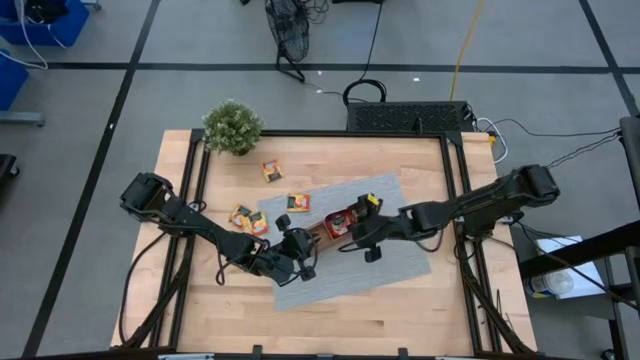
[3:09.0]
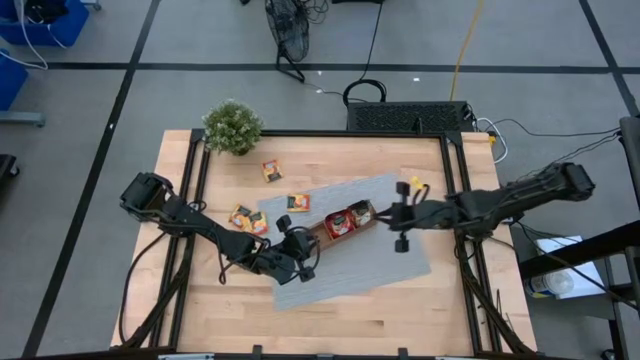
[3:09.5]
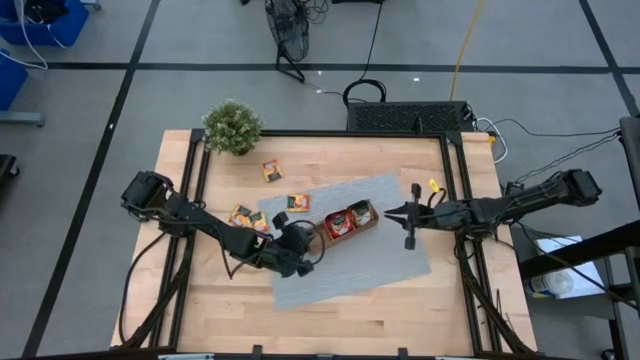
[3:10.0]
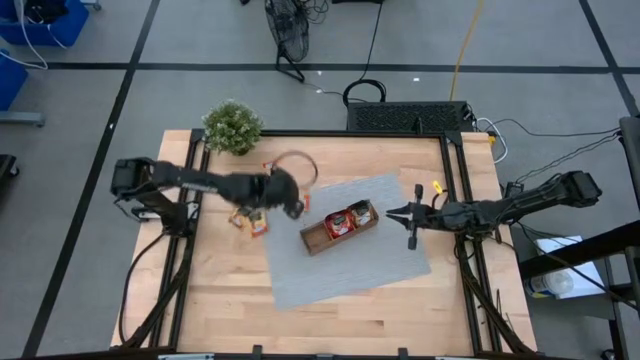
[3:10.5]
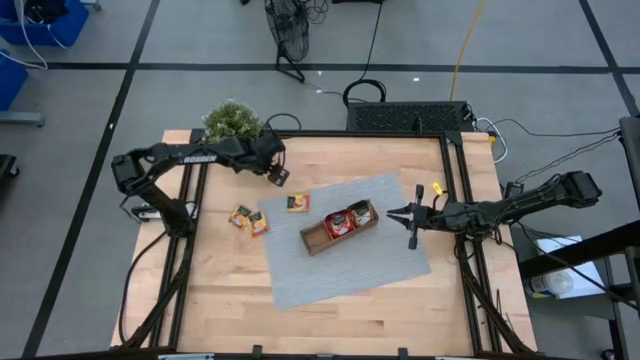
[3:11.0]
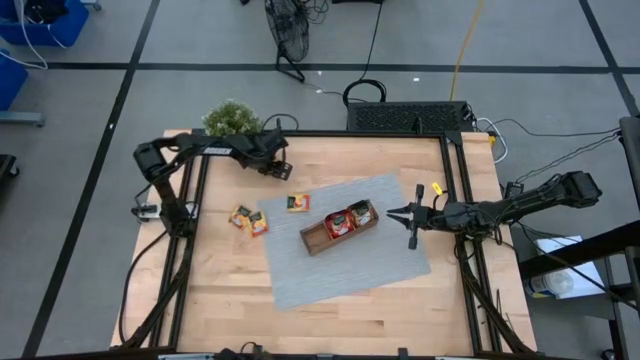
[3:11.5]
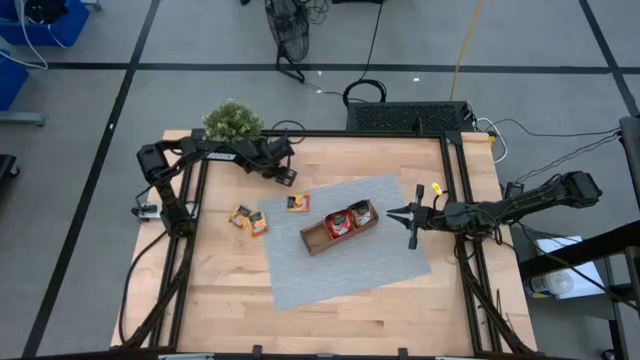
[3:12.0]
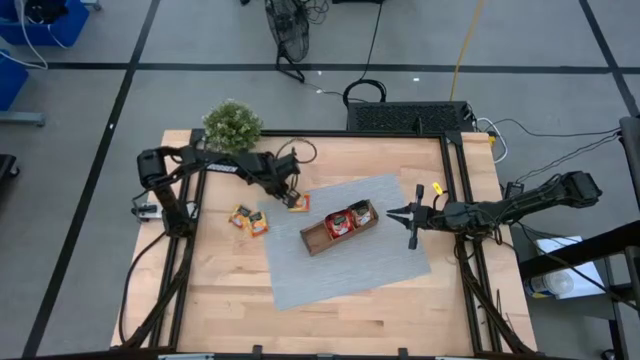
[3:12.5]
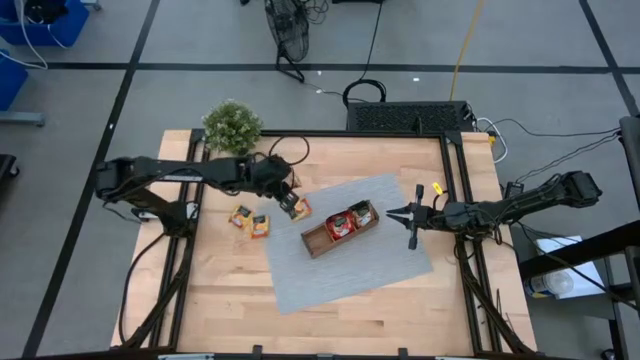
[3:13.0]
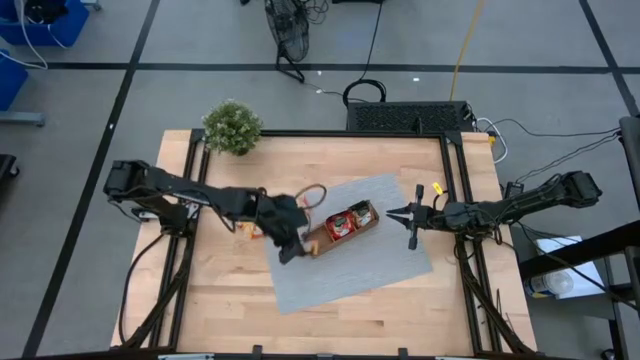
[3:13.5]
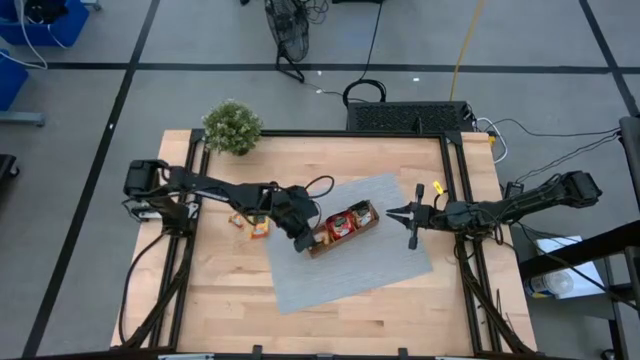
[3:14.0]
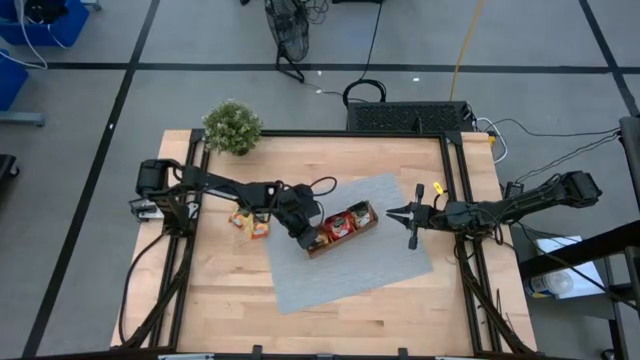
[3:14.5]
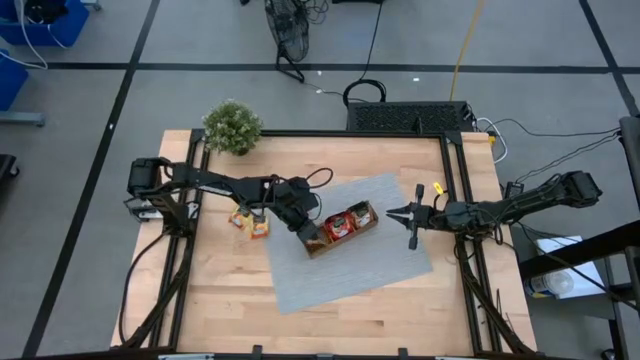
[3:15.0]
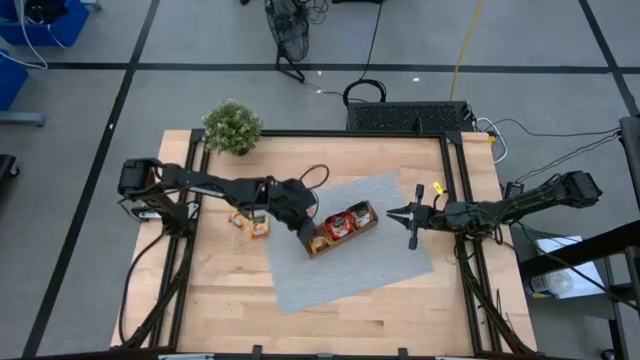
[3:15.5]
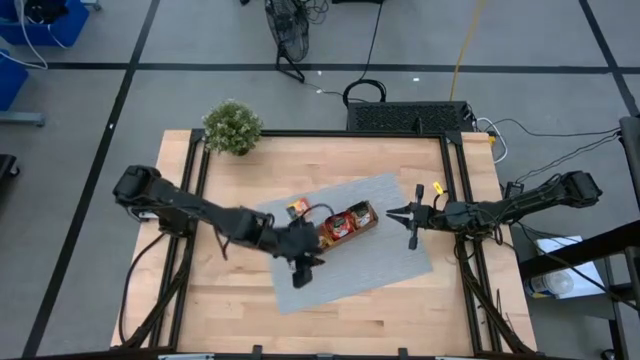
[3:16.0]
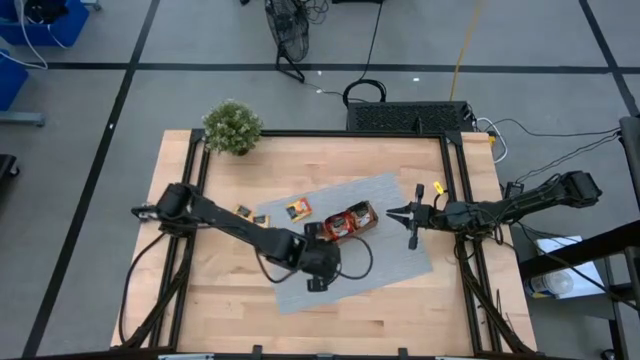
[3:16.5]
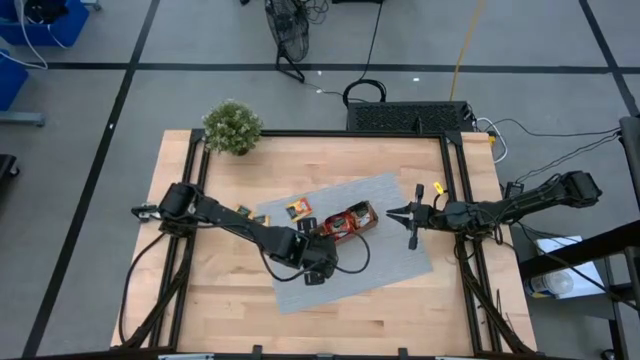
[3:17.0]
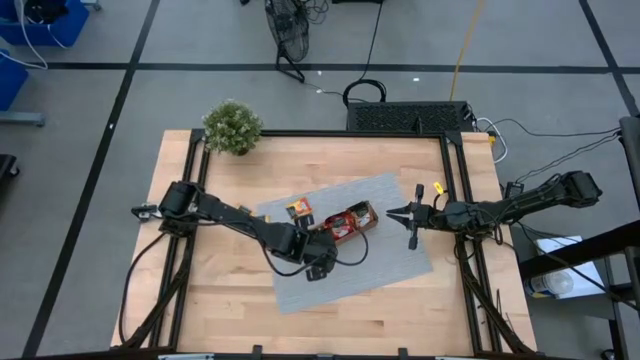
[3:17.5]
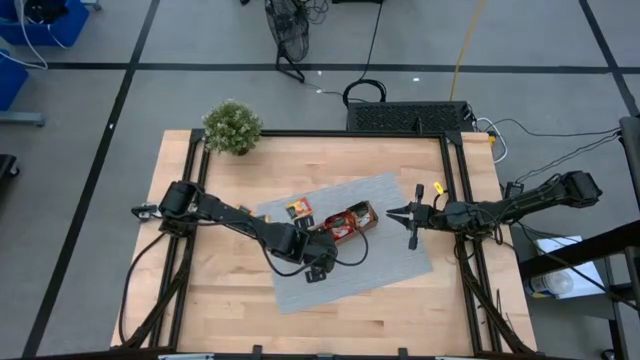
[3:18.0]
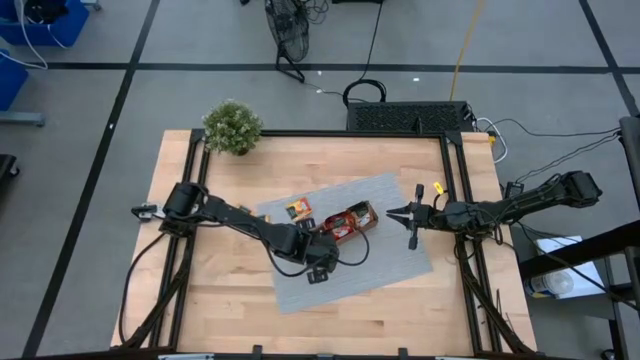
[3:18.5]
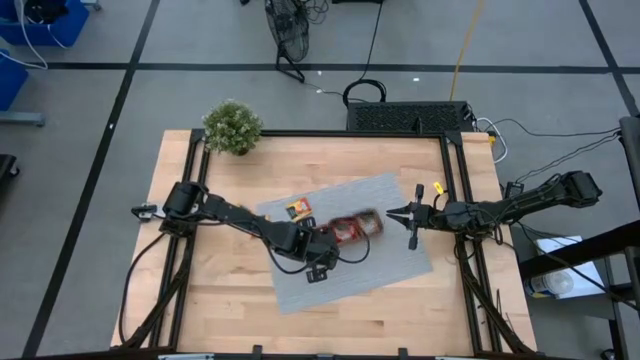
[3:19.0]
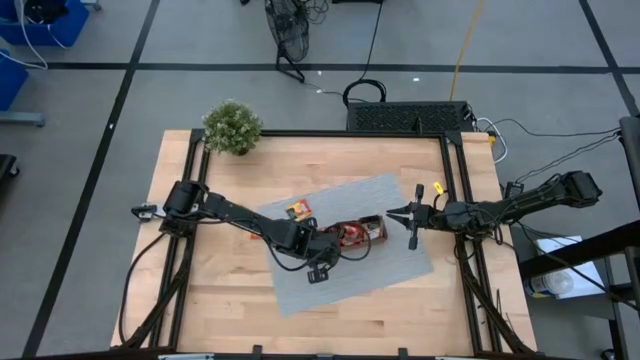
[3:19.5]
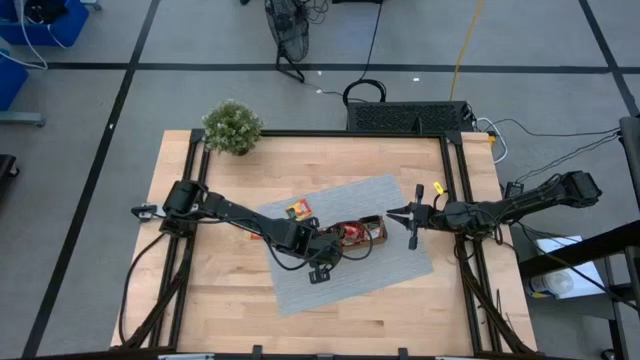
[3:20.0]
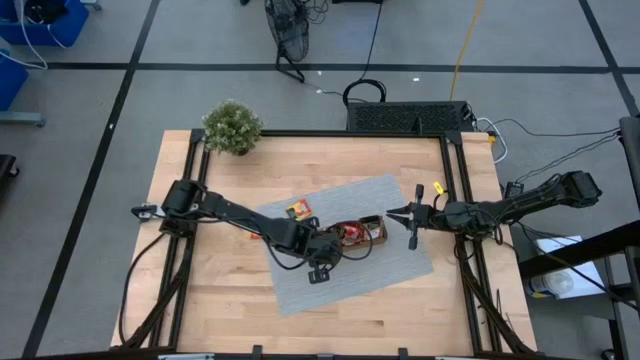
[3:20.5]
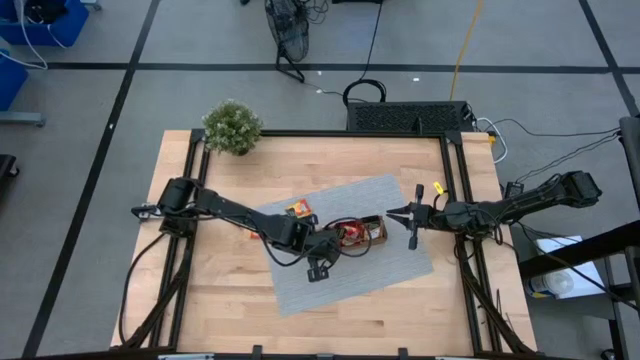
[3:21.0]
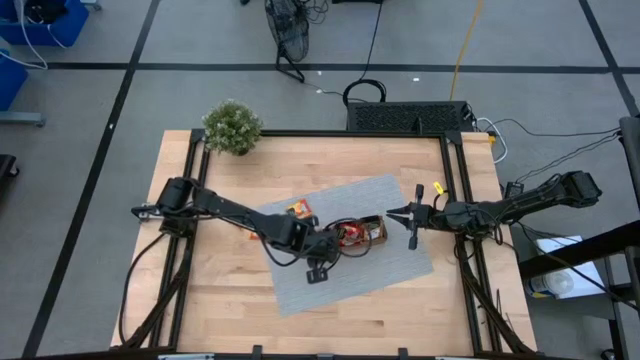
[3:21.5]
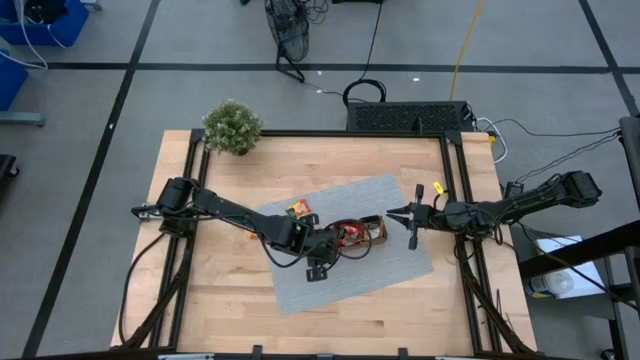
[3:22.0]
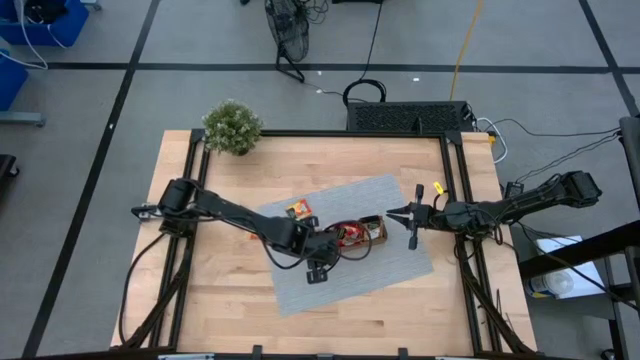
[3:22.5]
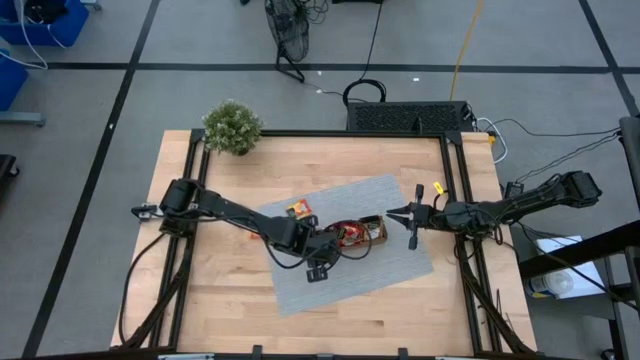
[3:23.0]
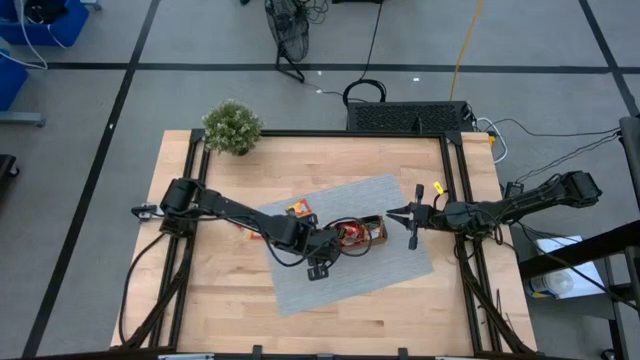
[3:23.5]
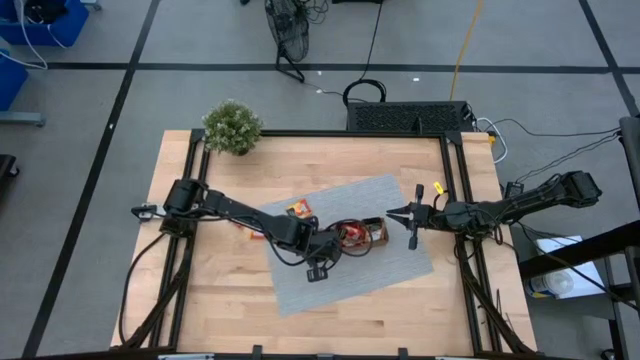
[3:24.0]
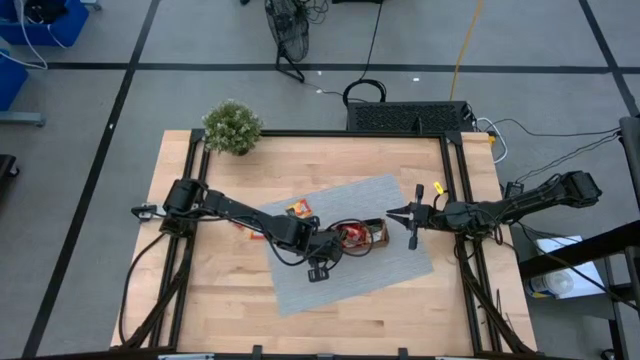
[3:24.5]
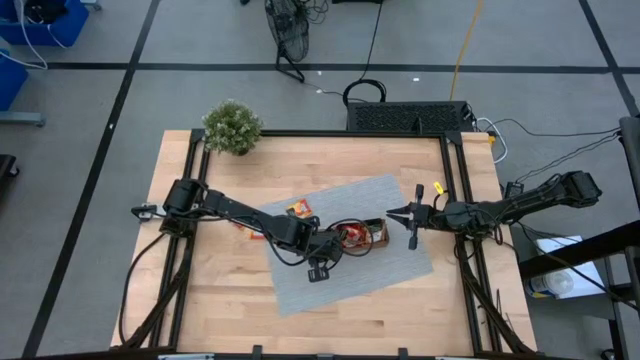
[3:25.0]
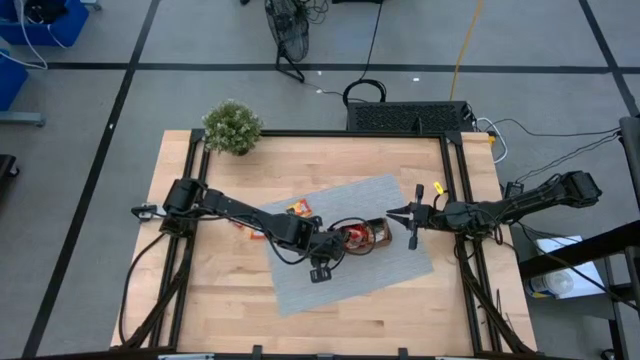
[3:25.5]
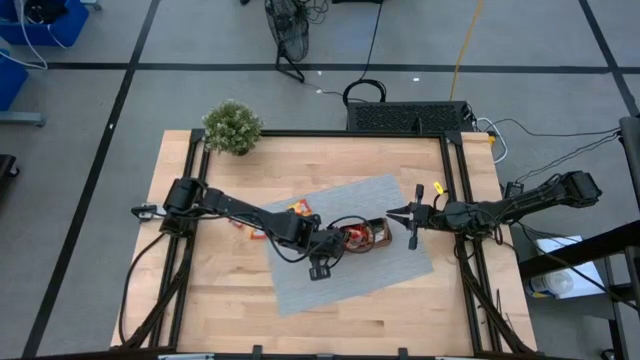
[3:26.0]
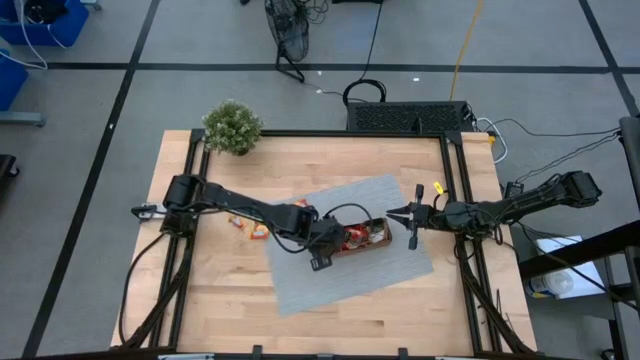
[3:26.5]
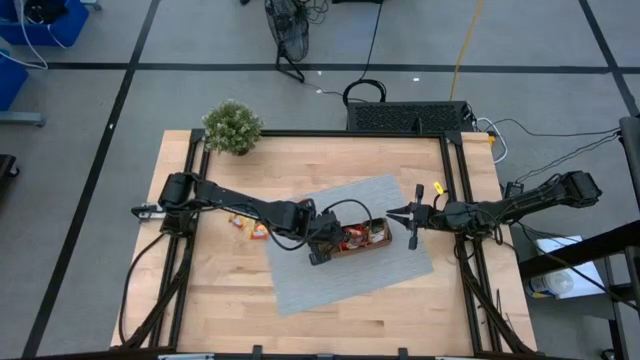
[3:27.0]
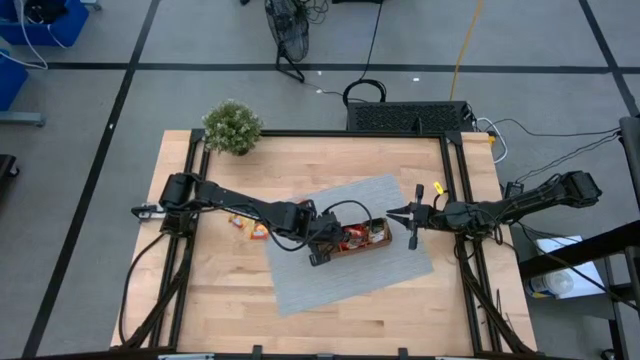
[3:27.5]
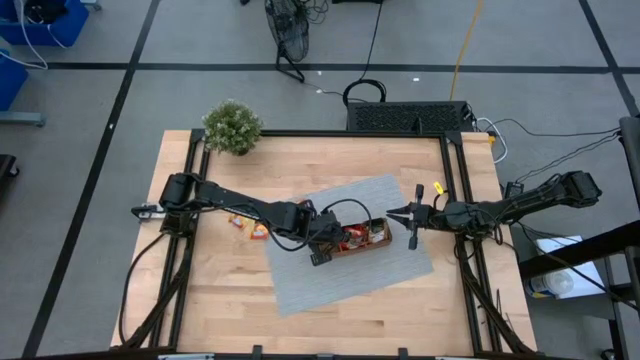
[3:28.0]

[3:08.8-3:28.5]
Task: Pick & Place Tea
Put the yellow tea bag into the left section of the wooden organizer

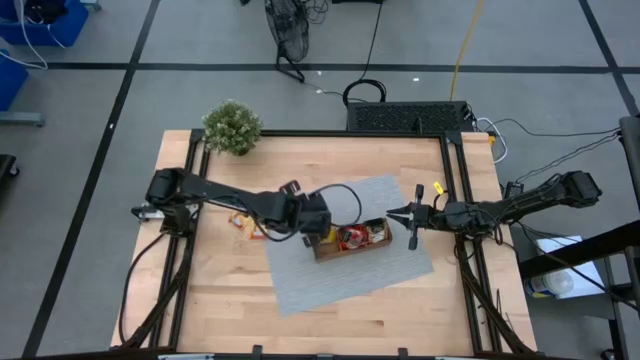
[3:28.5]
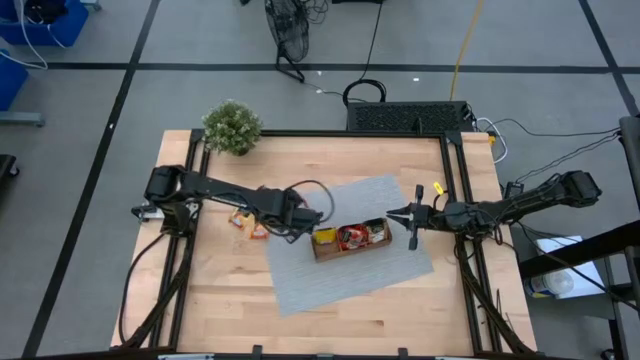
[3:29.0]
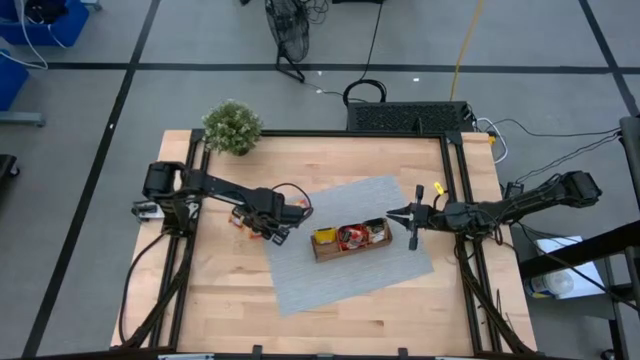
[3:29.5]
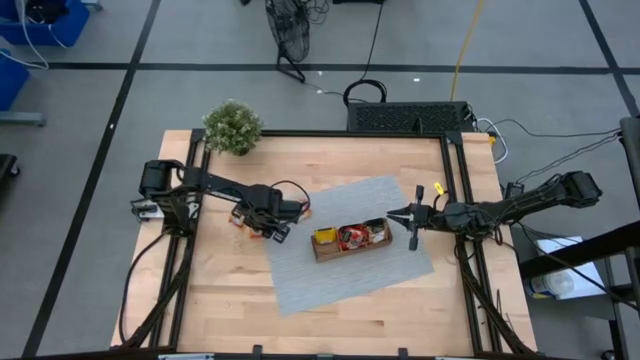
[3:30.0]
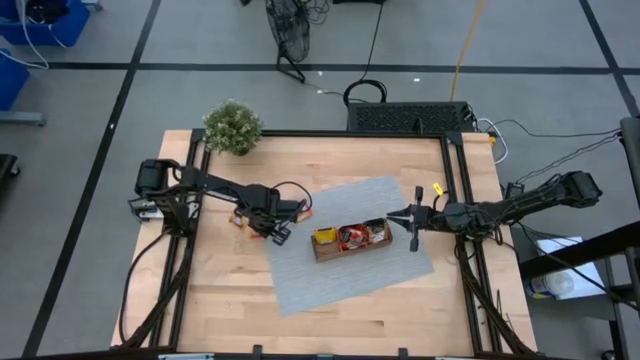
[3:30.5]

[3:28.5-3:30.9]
Put the yellow tea bag into the left section of the wooden organizer

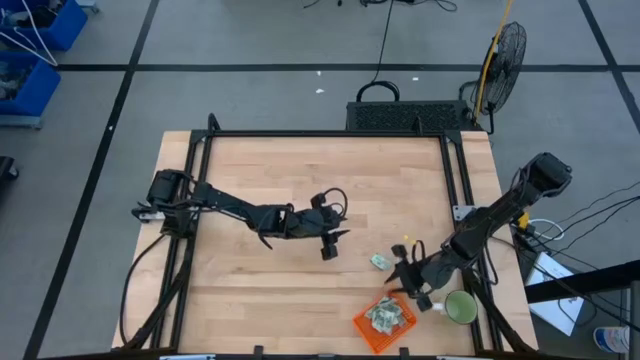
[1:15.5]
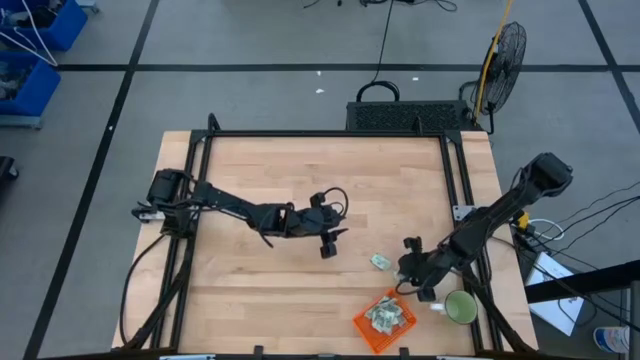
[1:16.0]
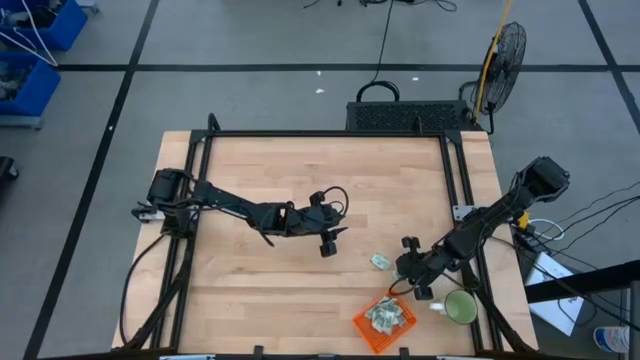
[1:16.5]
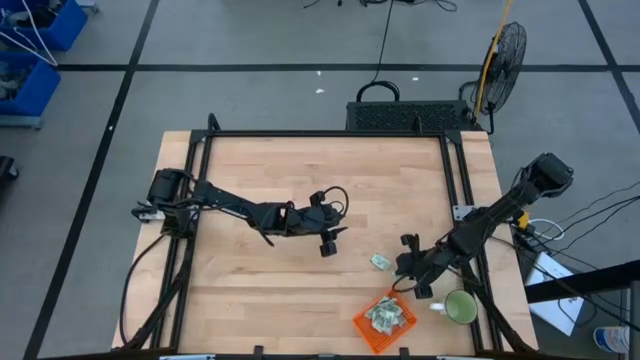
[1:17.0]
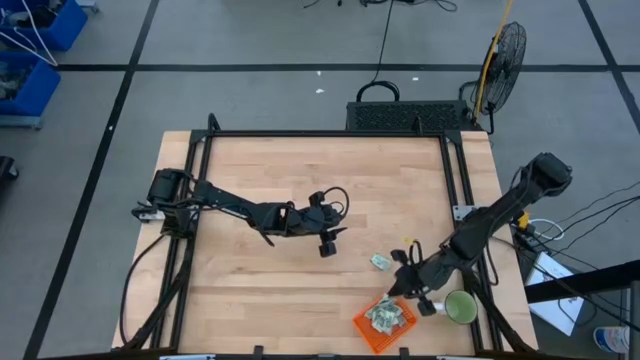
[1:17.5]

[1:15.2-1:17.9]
Task: Pick and place Stevia / Truvia into bins
Put the stevia packet into the orange bin
